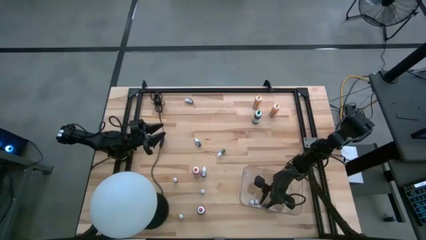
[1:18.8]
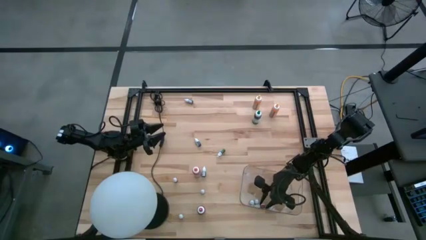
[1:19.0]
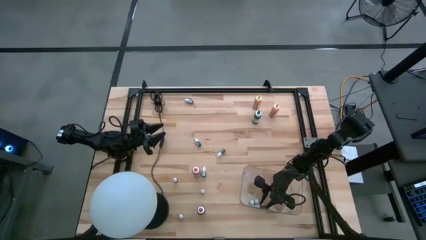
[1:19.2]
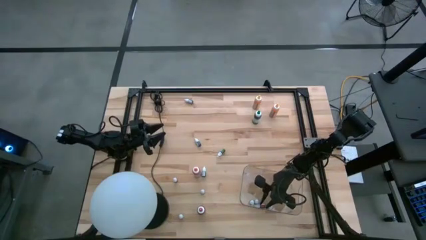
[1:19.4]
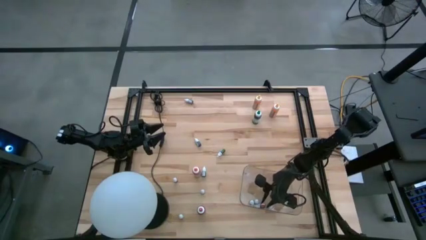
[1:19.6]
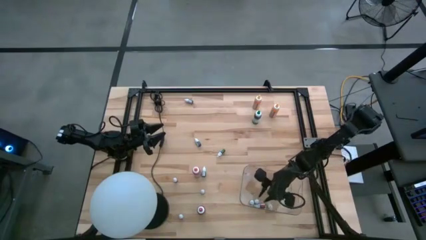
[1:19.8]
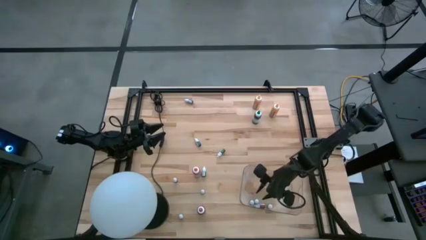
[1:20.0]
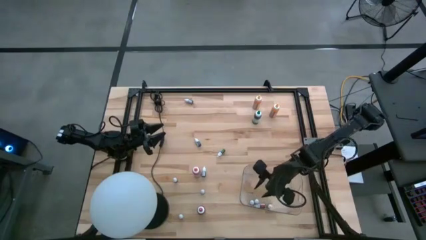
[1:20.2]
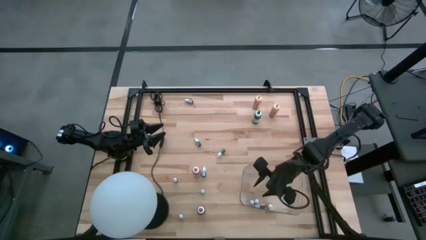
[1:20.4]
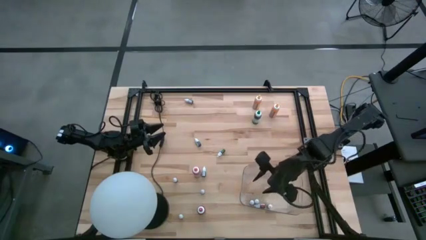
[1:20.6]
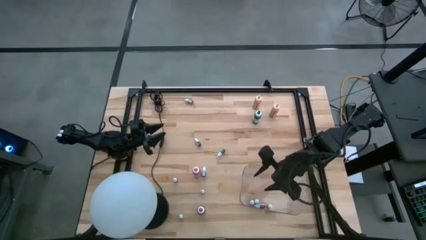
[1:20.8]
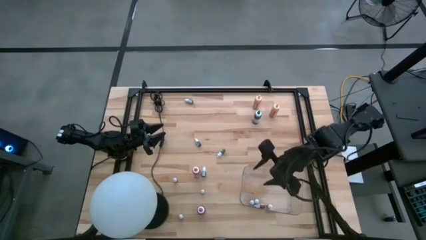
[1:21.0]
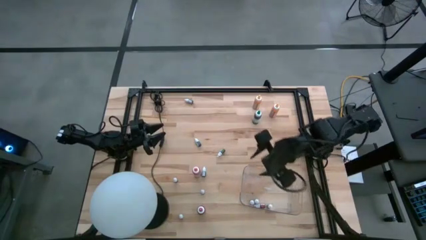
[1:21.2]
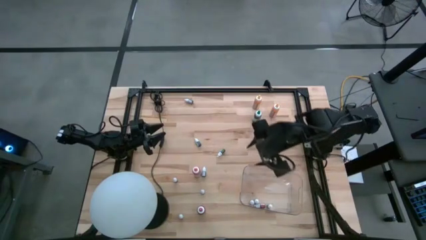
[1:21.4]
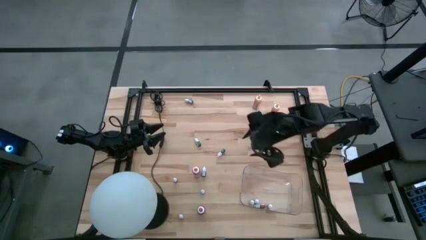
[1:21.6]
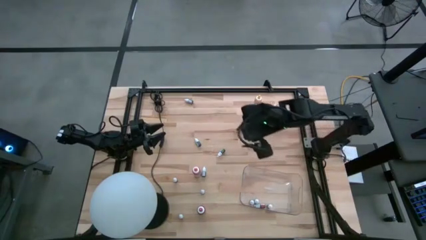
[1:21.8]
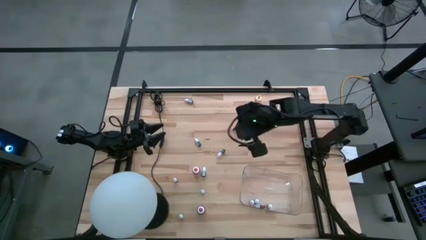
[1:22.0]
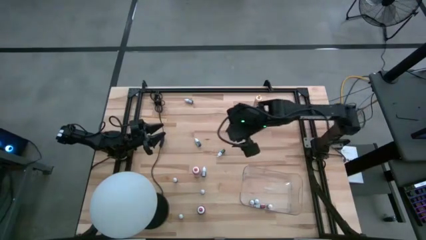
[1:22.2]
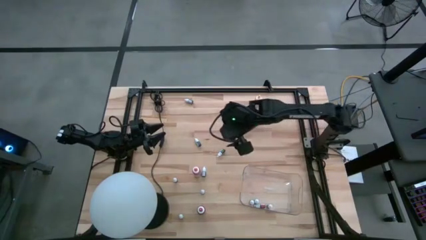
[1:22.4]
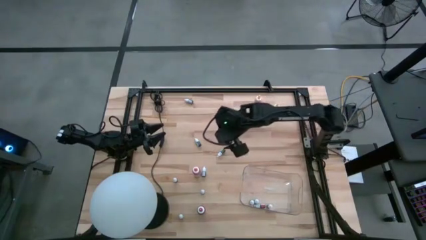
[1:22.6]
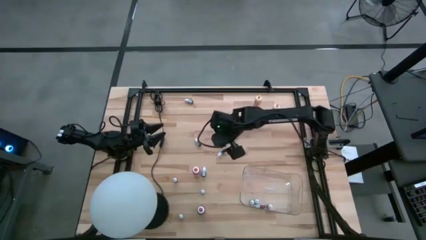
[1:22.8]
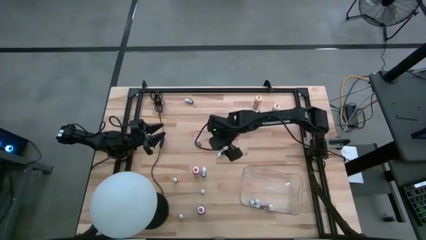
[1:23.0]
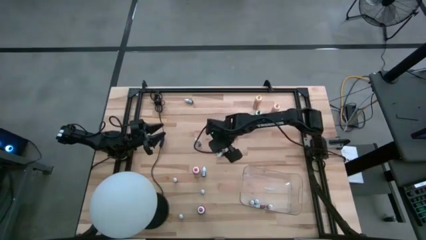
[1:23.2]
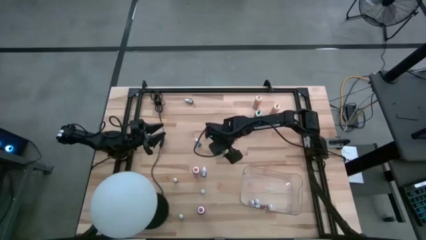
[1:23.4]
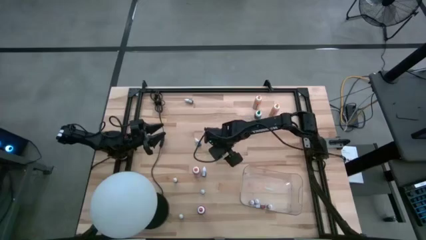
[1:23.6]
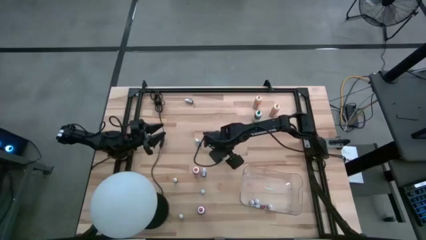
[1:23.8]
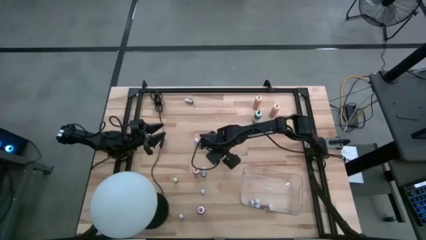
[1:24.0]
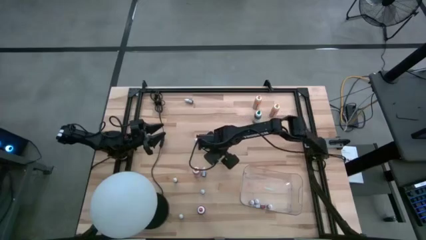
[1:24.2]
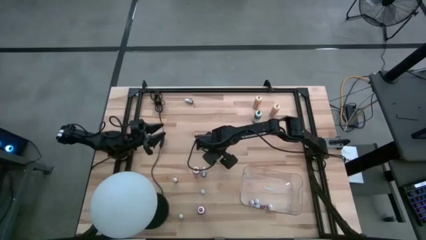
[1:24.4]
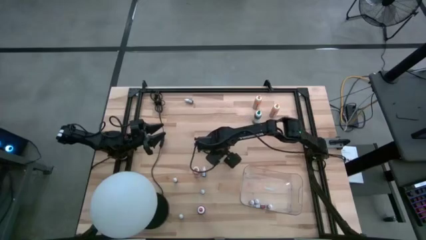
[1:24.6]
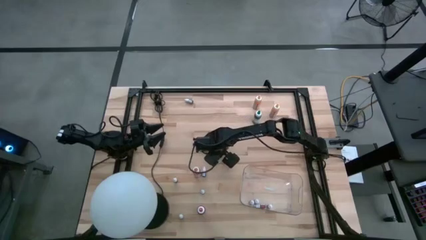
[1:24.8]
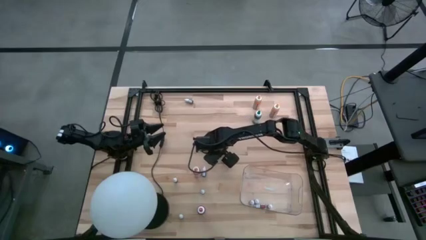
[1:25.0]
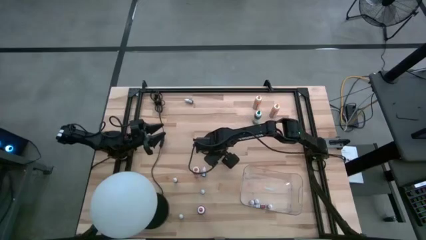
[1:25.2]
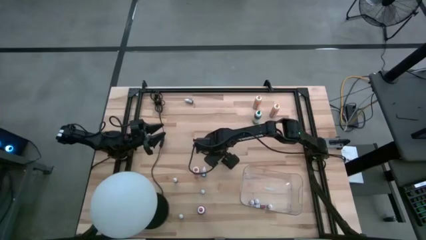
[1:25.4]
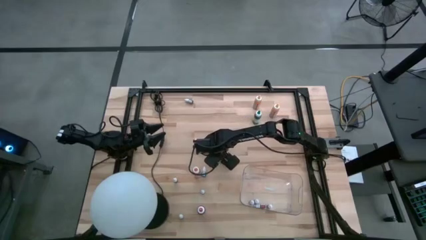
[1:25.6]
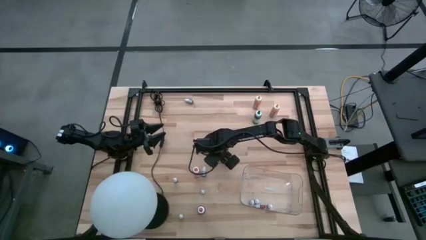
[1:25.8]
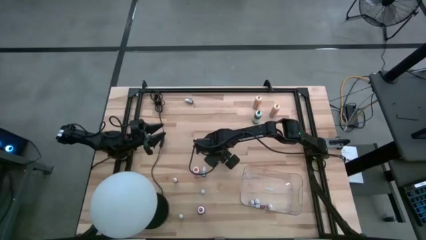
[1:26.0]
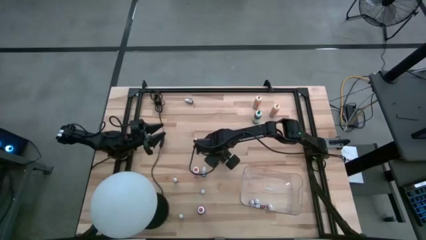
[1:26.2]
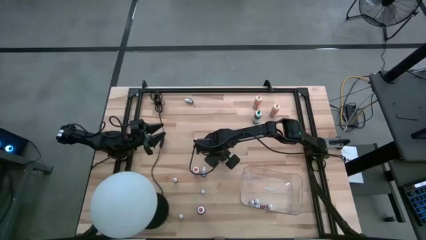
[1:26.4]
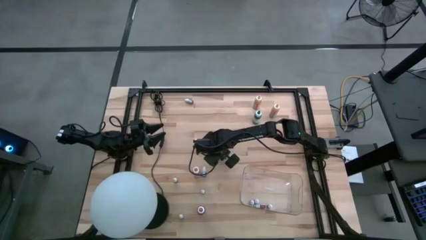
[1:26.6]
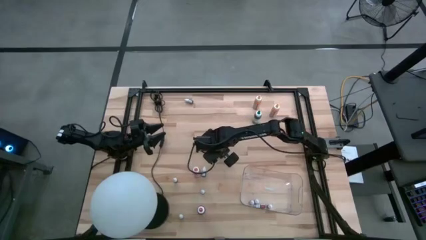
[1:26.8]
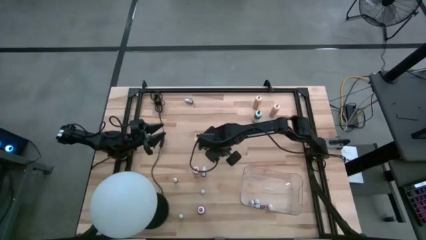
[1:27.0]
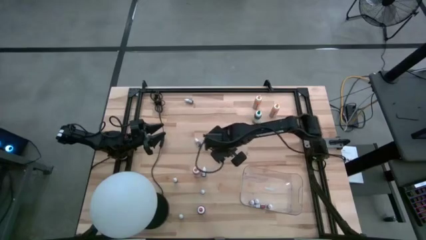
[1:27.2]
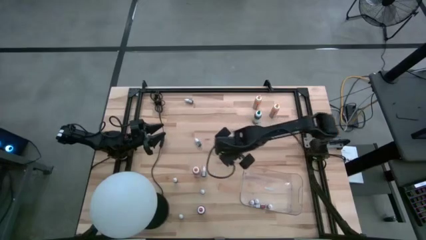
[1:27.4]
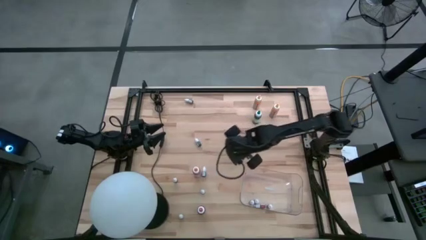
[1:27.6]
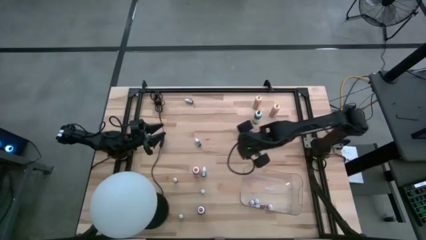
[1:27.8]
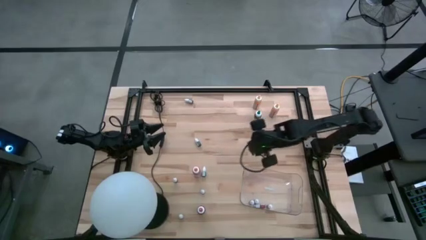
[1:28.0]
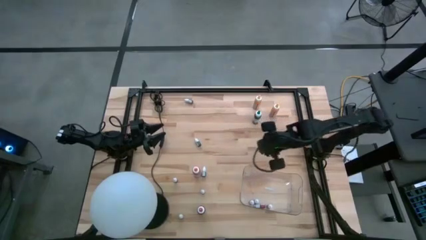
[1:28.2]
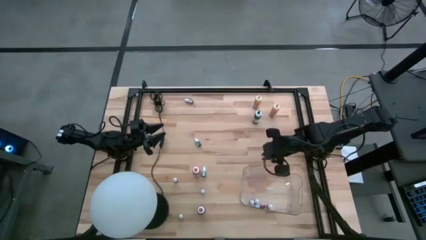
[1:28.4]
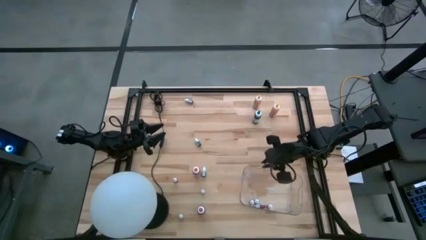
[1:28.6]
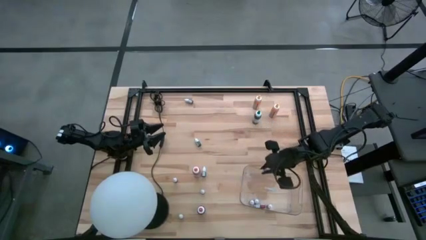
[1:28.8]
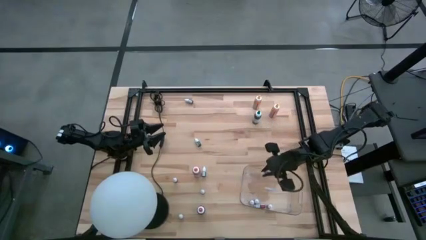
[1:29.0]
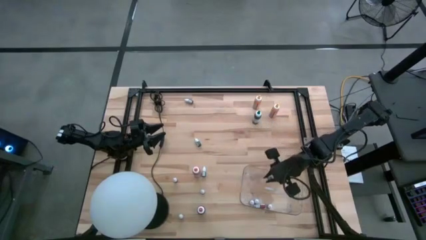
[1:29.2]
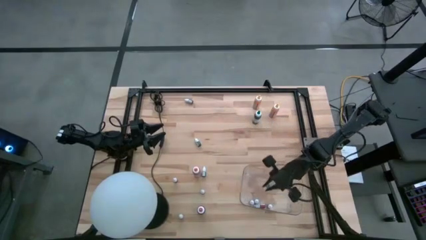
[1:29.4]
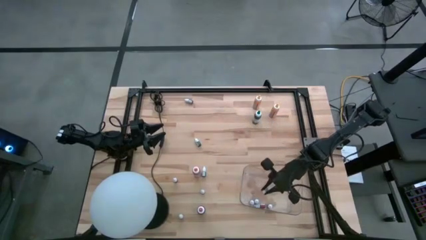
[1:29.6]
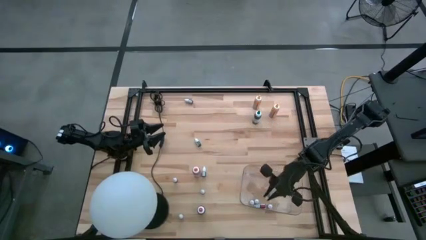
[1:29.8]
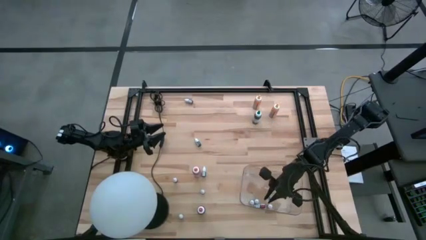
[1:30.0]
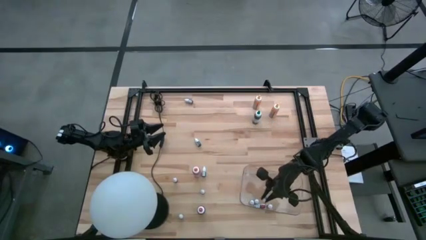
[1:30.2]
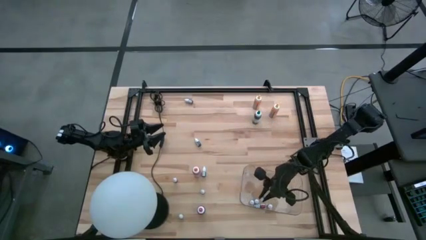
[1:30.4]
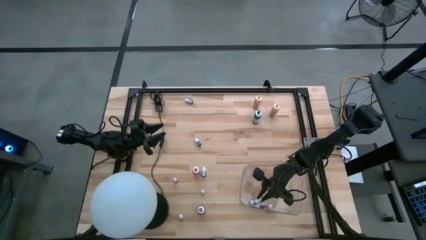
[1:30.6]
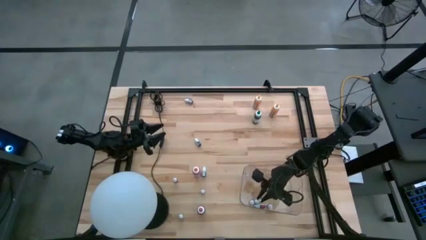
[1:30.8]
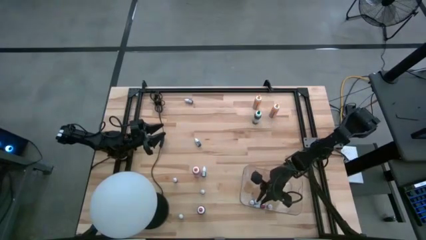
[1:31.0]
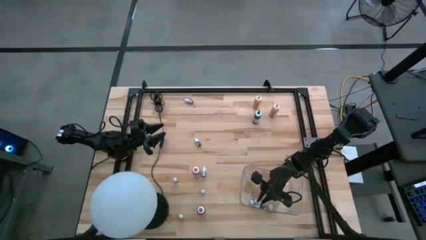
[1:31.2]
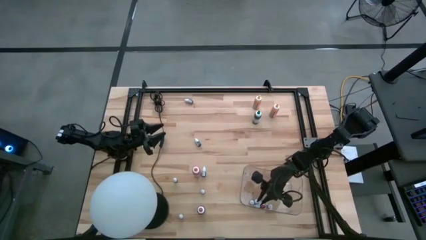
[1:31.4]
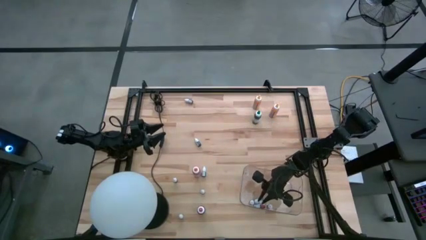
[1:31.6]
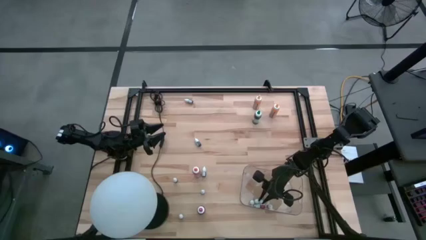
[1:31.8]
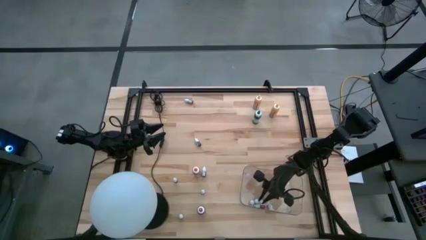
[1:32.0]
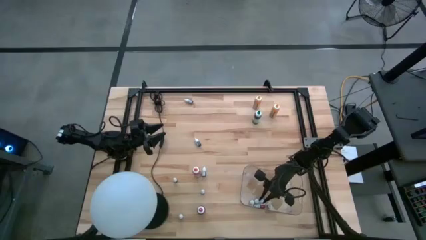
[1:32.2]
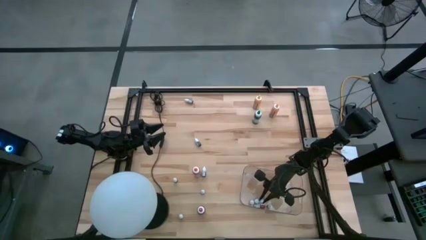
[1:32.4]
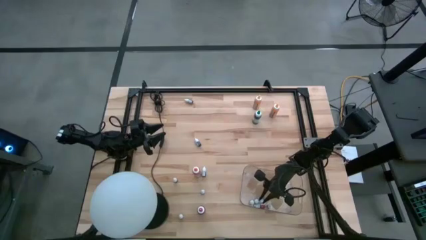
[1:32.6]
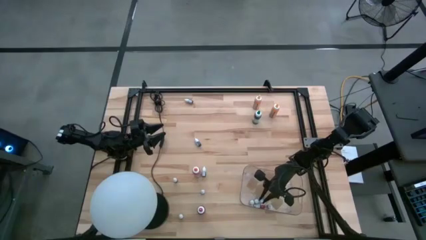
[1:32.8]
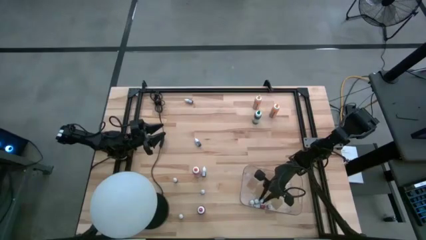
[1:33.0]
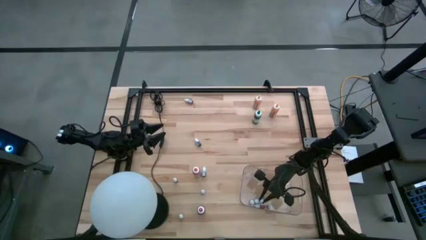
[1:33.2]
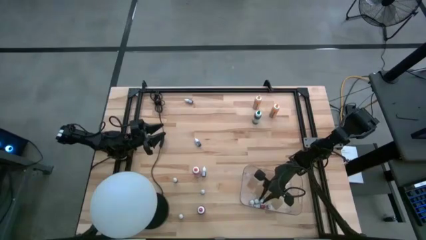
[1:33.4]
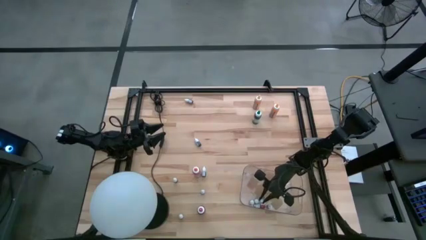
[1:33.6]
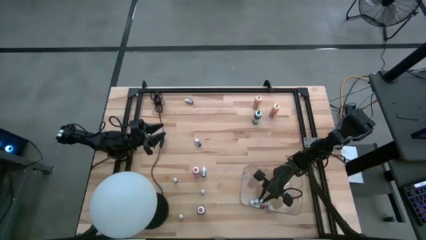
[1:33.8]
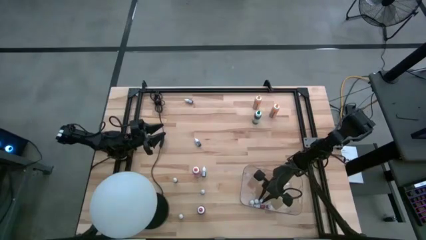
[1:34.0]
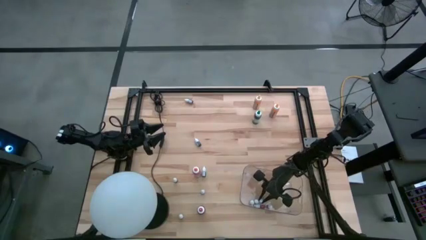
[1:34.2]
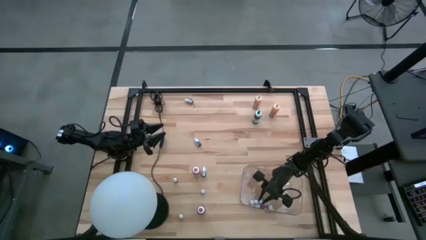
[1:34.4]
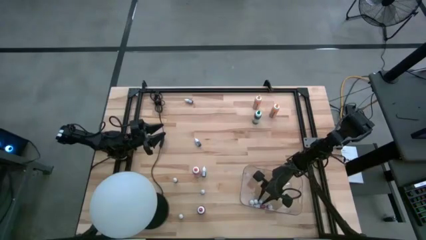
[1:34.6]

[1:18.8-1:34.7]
Task: Pick & Place food coloring
Put the green food color into the transparent bin

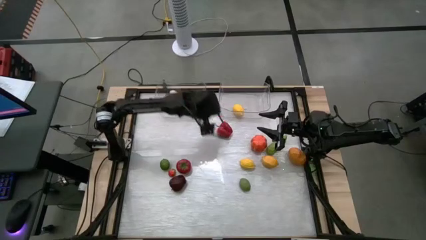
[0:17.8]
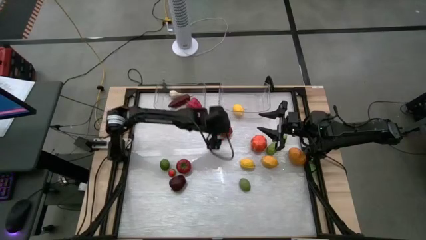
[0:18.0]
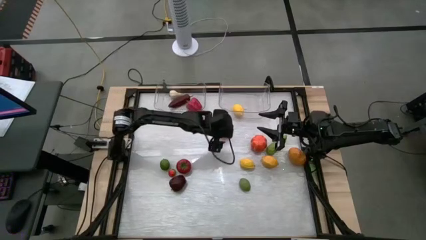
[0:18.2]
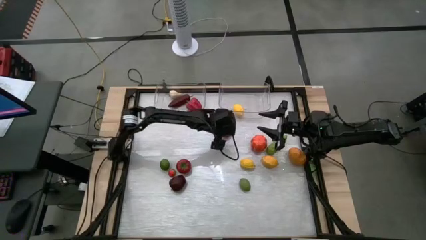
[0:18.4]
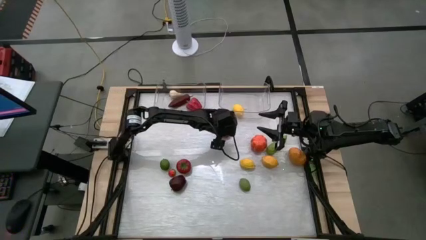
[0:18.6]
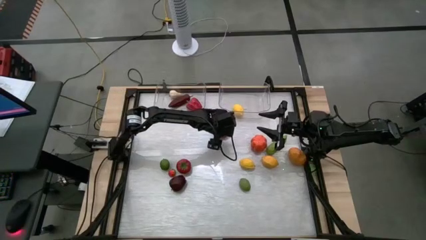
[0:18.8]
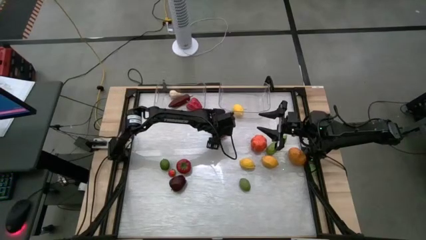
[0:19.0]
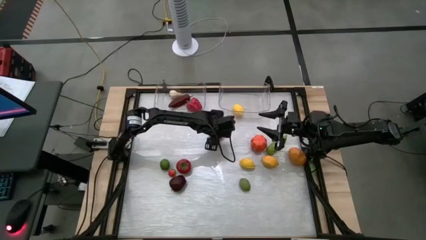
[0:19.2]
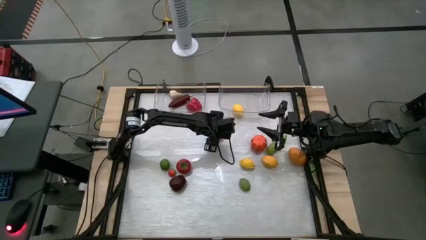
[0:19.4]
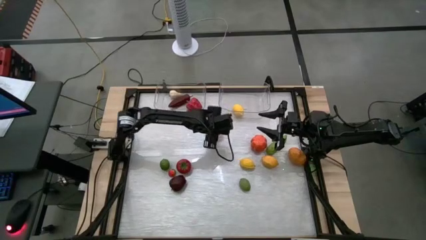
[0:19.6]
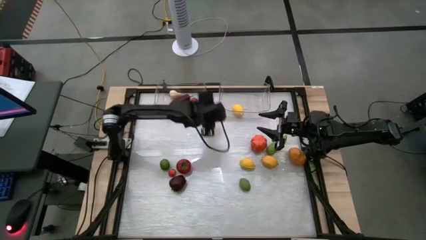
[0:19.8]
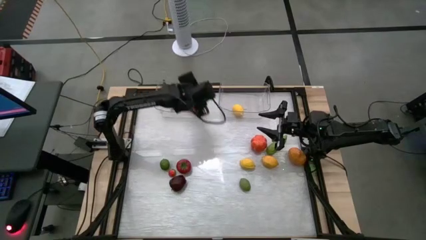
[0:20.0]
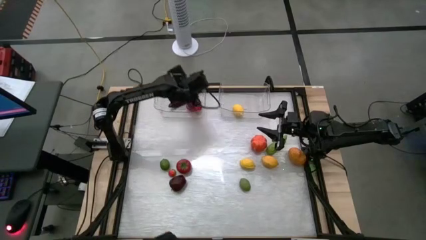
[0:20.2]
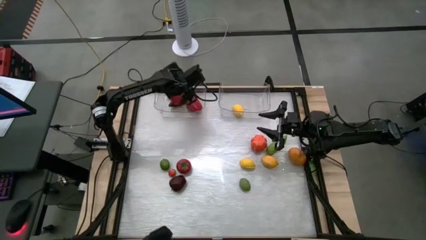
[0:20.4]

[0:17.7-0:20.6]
Task: Sort produce into baskets
Put the bell pepper in the container
